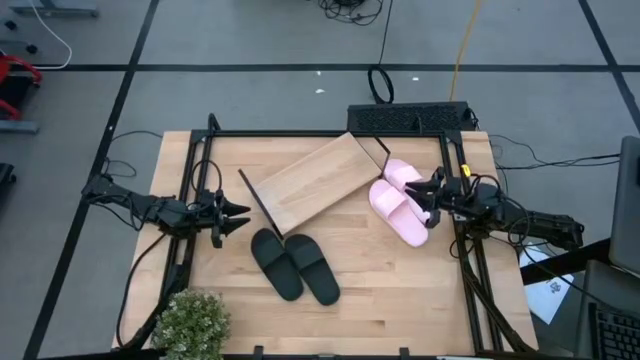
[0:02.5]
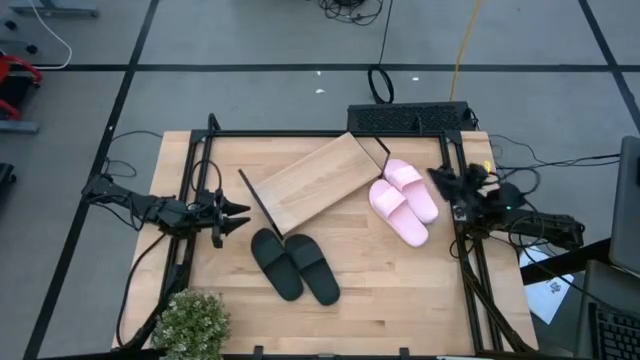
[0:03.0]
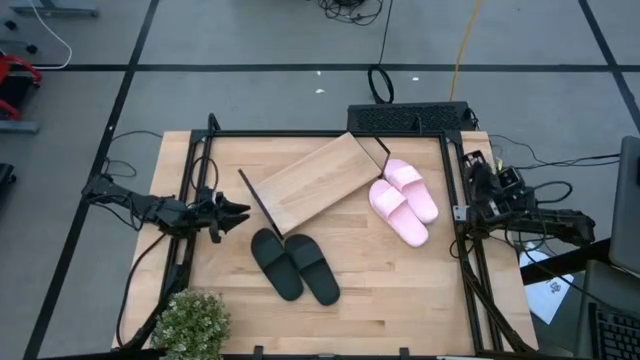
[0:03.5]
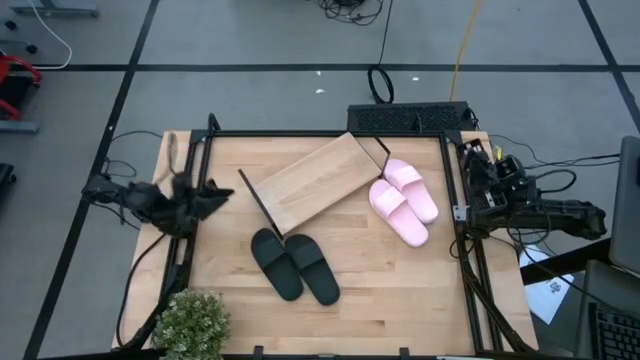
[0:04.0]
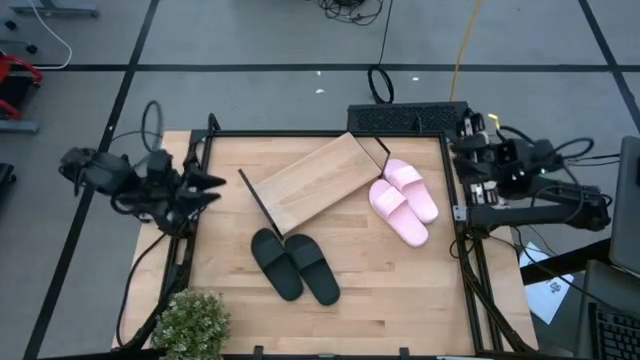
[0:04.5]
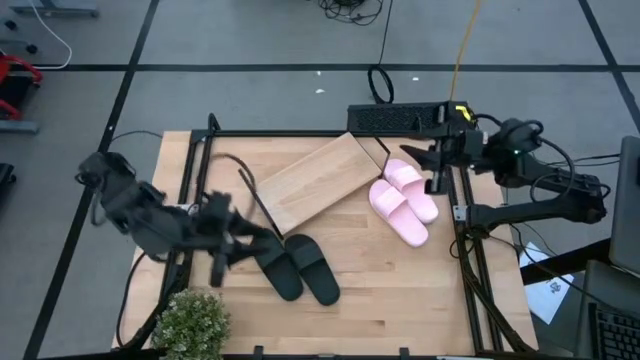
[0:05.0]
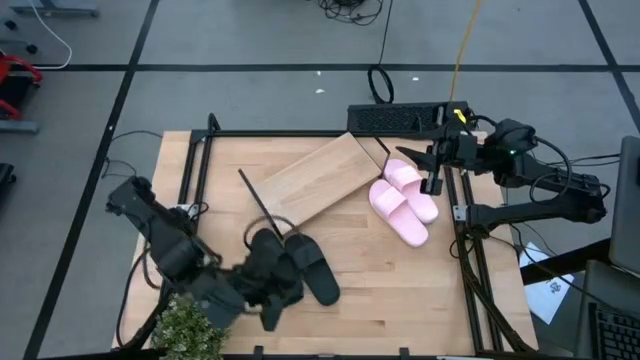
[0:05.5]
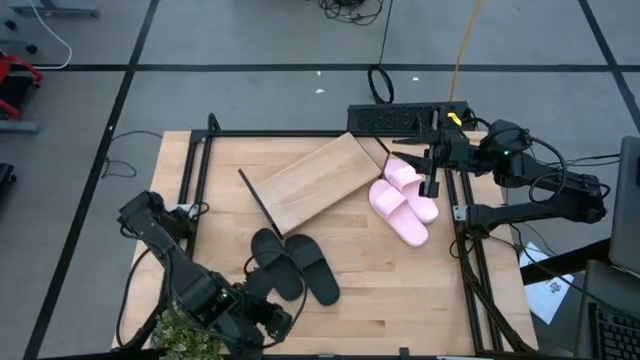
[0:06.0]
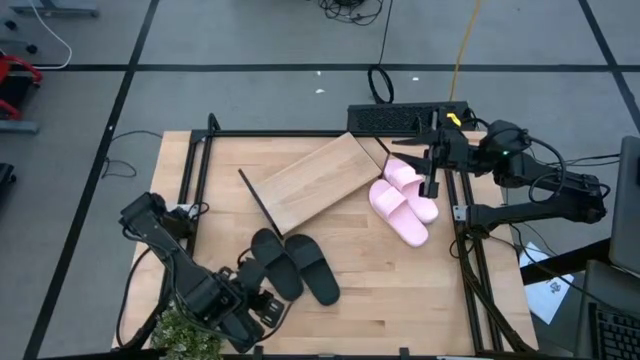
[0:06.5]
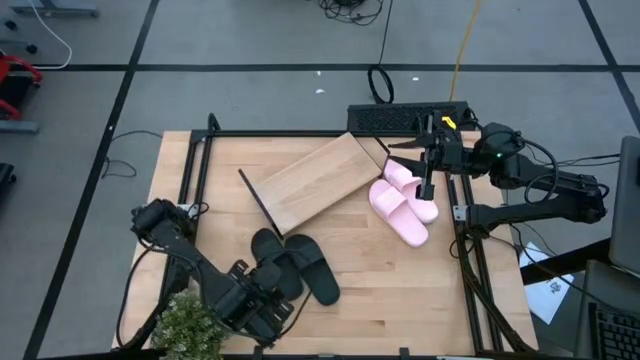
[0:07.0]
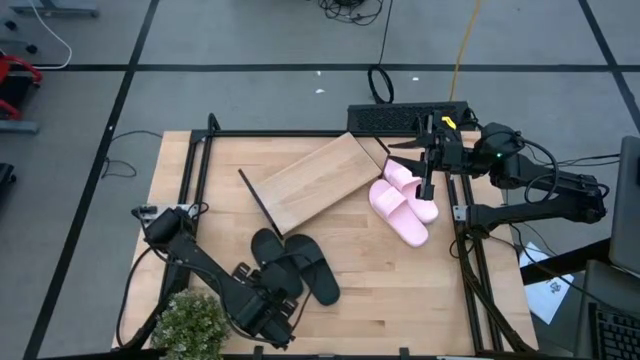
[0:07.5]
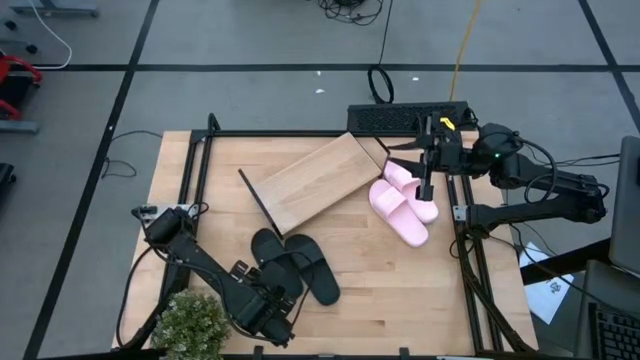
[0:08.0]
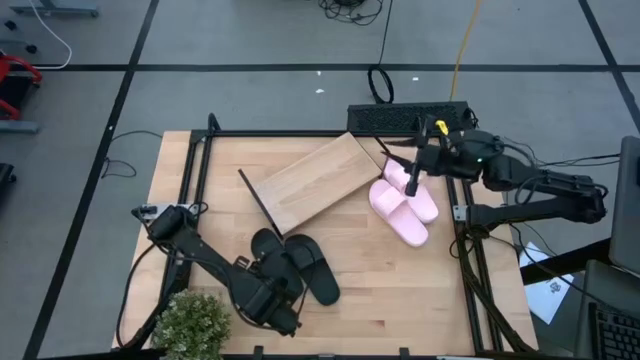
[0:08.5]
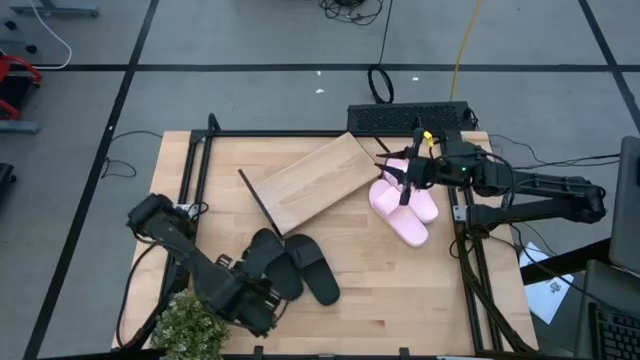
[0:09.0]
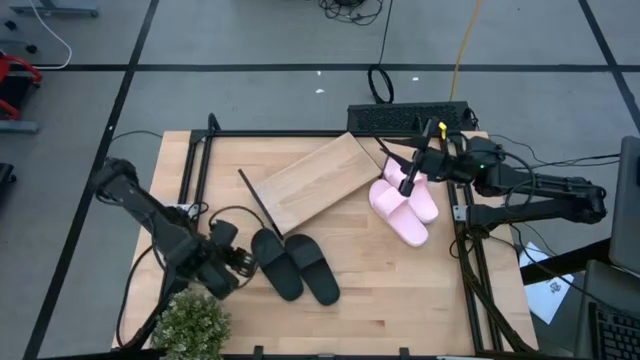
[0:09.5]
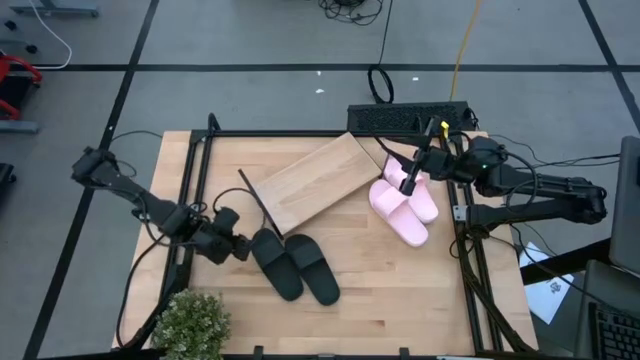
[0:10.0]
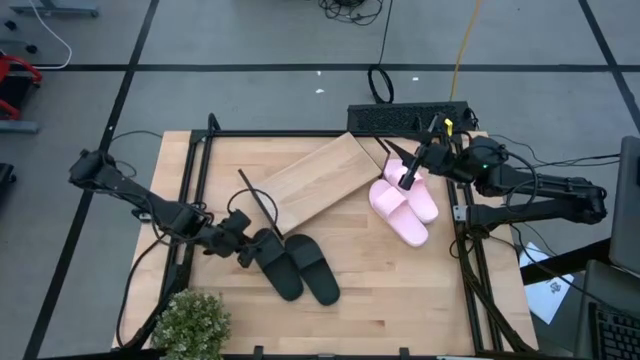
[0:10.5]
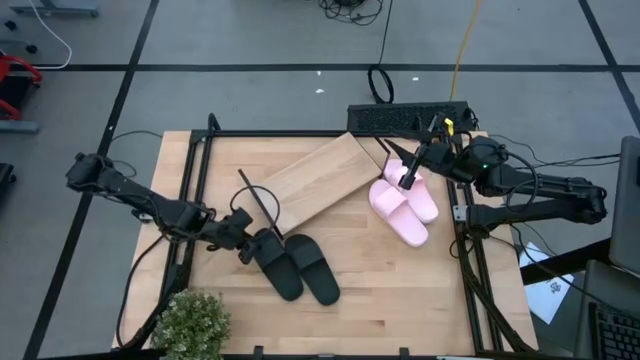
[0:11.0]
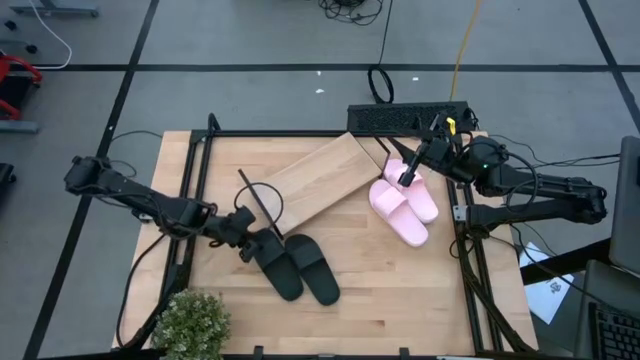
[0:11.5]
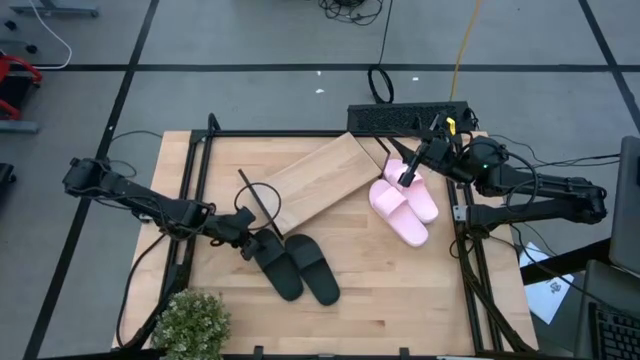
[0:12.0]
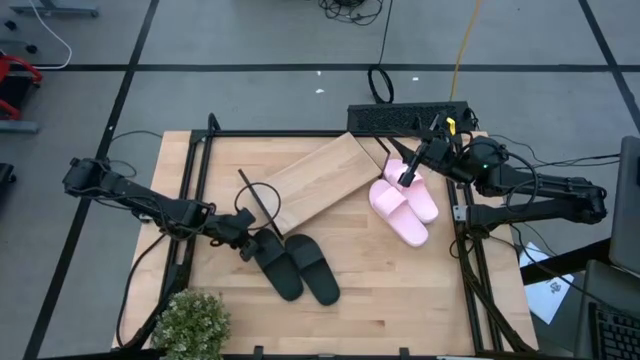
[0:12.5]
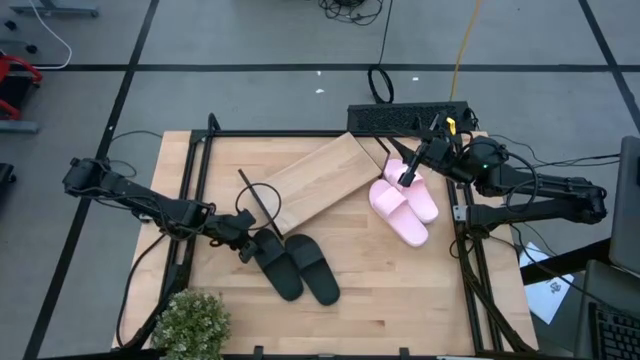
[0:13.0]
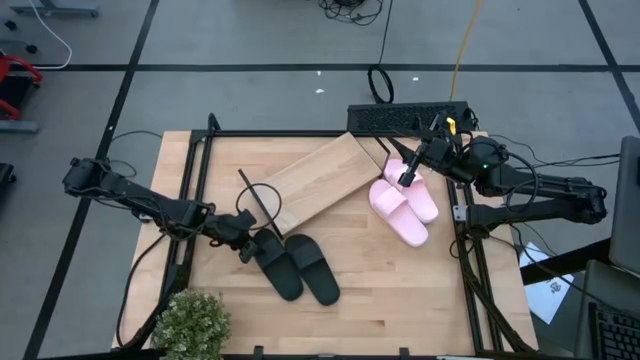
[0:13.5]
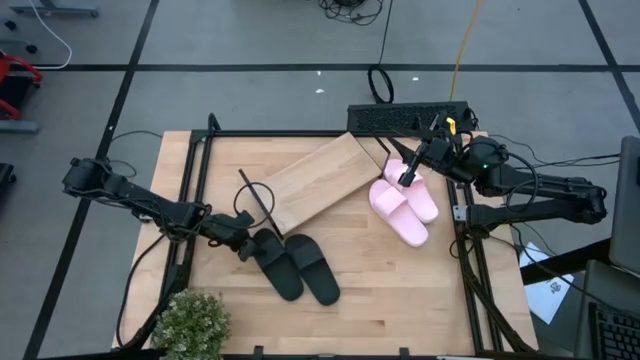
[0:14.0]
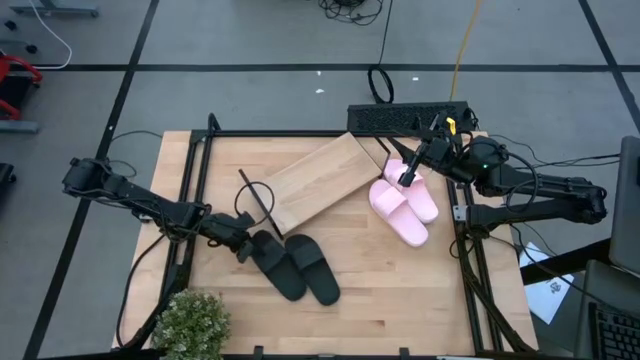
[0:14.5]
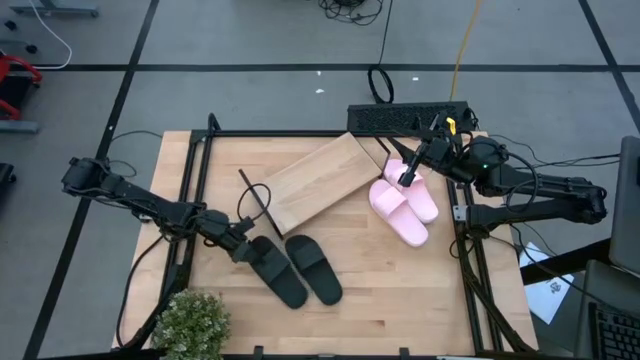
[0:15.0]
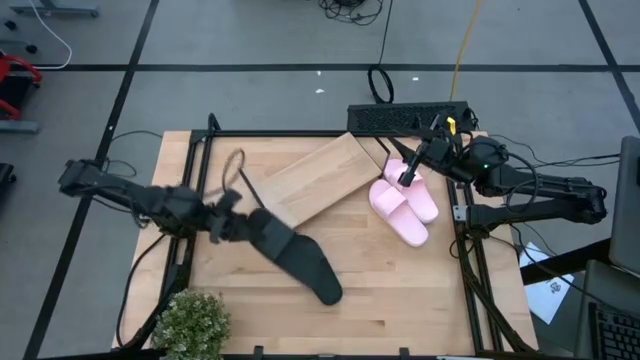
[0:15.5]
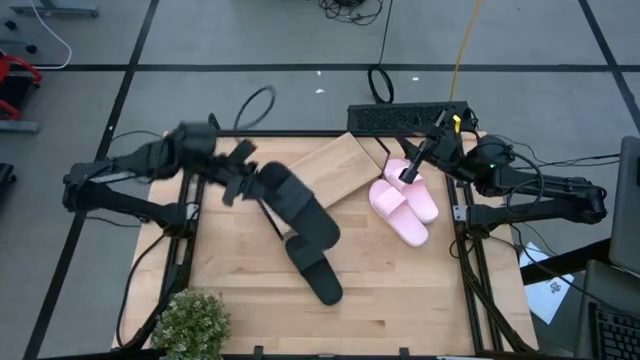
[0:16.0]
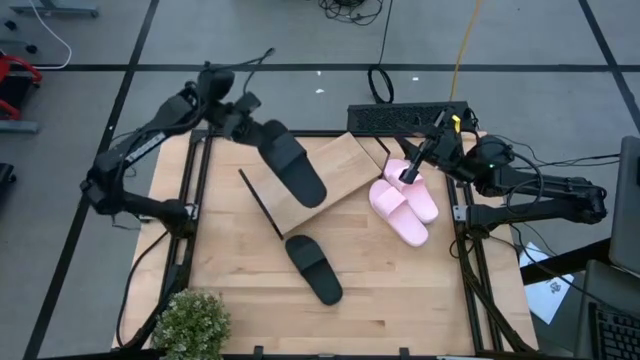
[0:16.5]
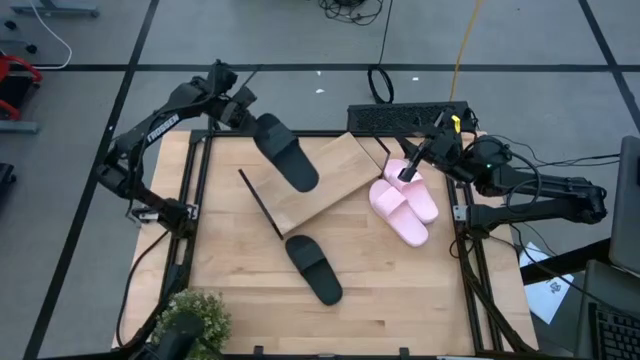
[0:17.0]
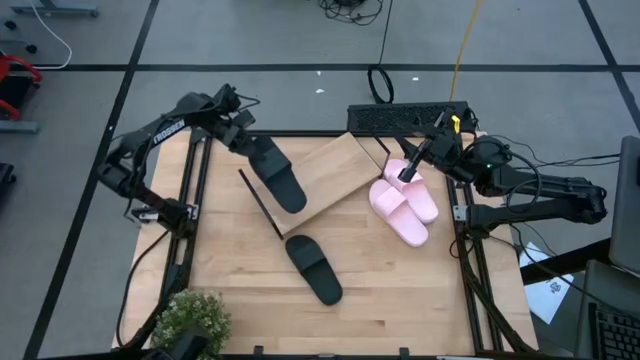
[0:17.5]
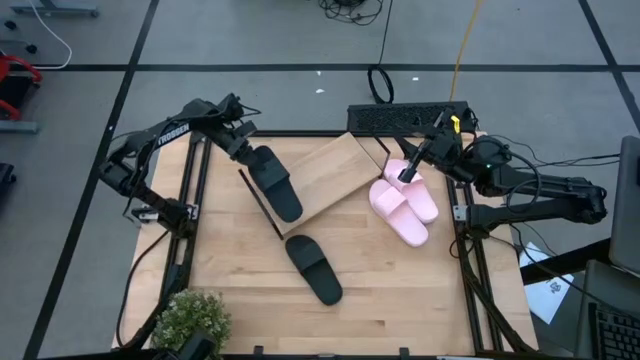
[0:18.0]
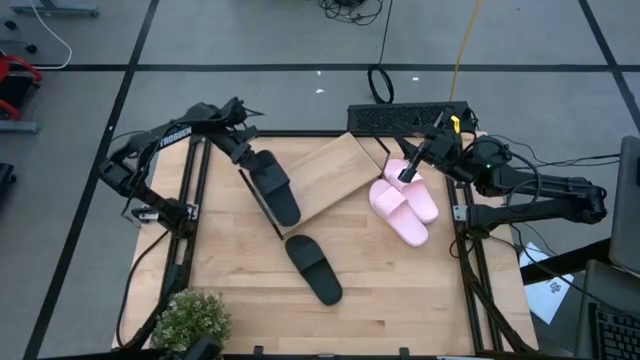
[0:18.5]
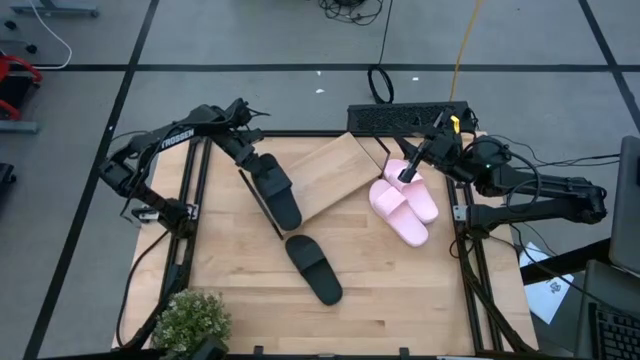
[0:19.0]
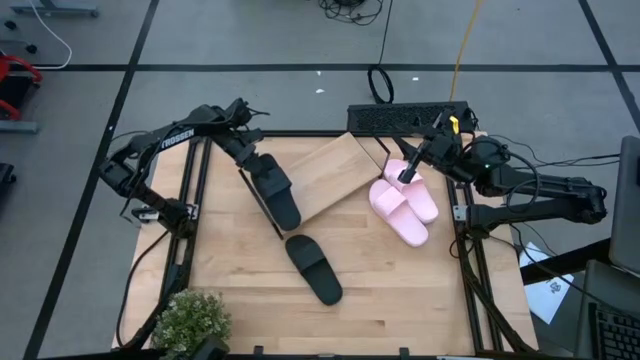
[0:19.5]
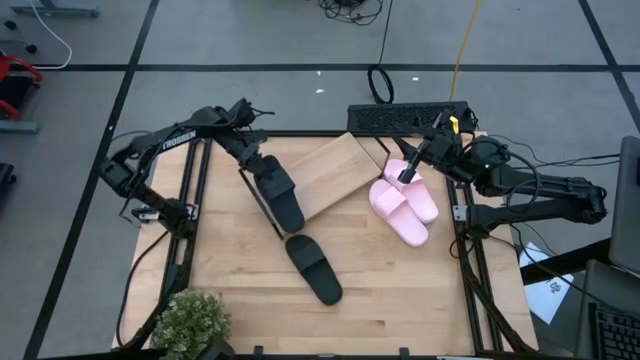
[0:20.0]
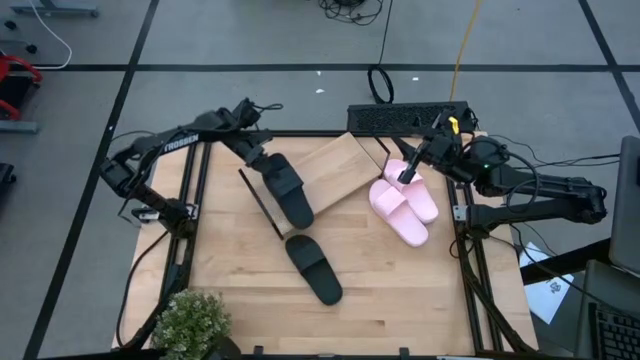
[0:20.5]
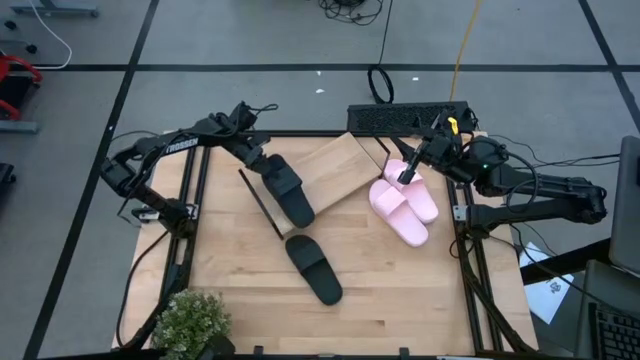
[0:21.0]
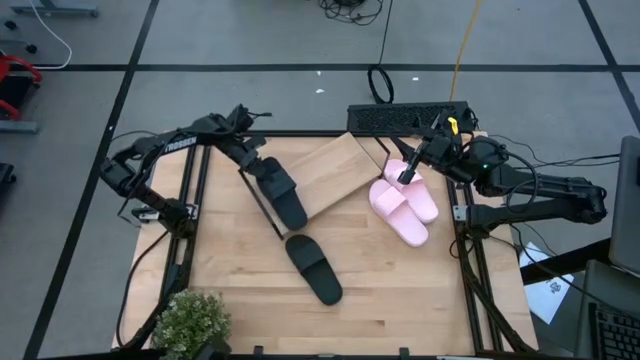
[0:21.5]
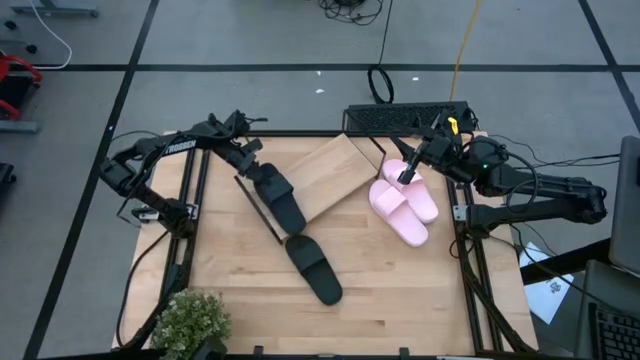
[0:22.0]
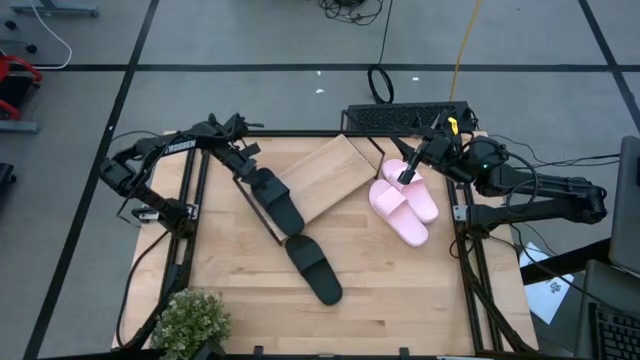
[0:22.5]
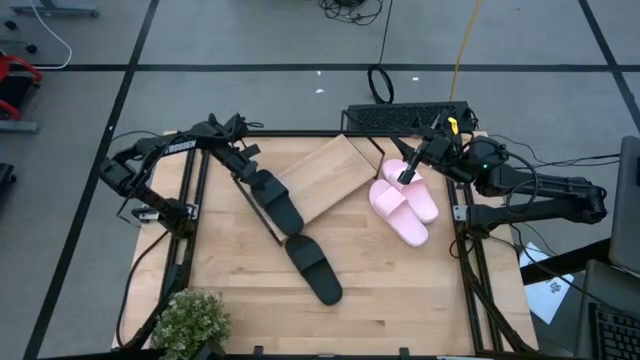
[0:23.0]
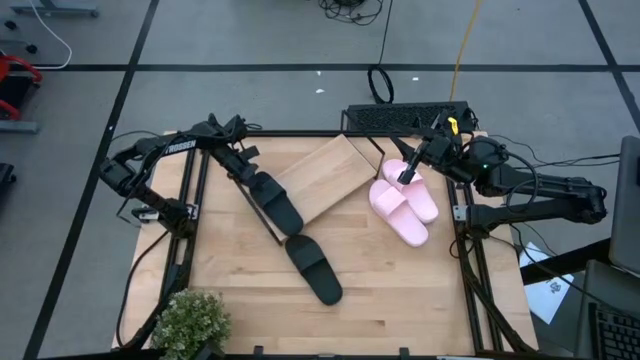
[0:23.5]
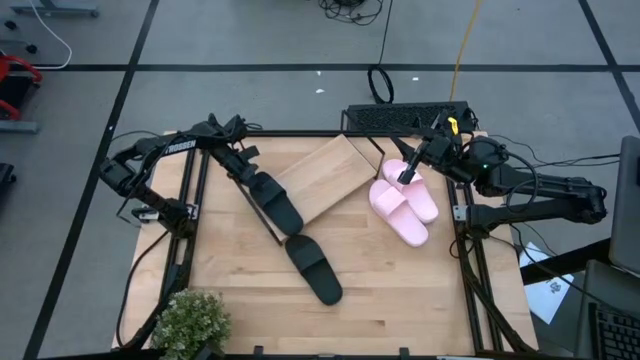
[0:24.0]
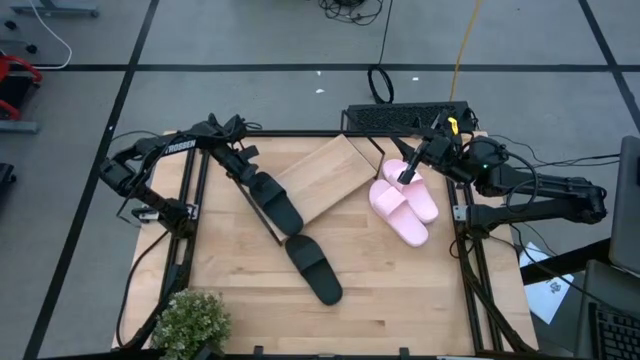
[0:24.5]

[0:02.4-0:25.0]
Task: Pick and place slides into the shelf
Put the left black slide on the shelf
